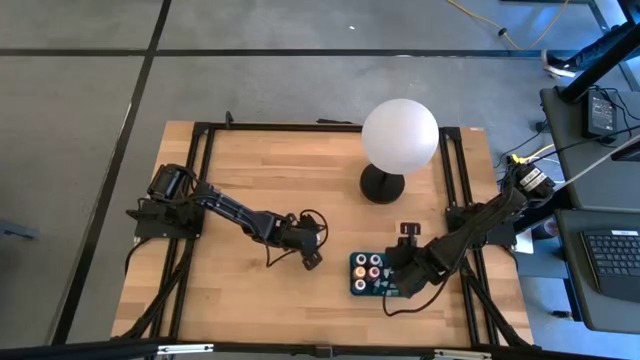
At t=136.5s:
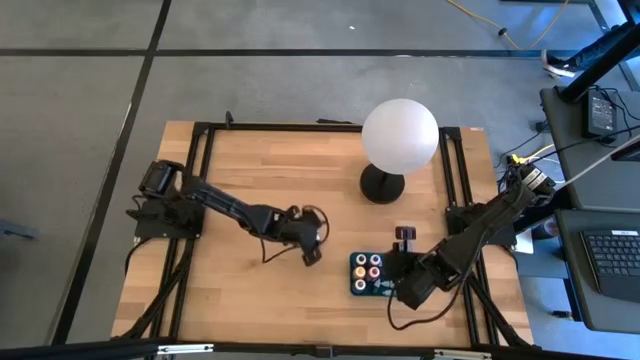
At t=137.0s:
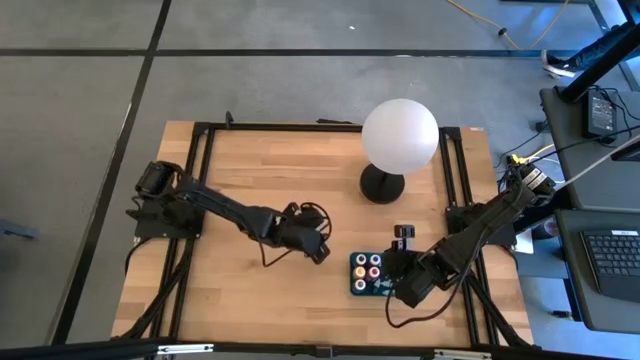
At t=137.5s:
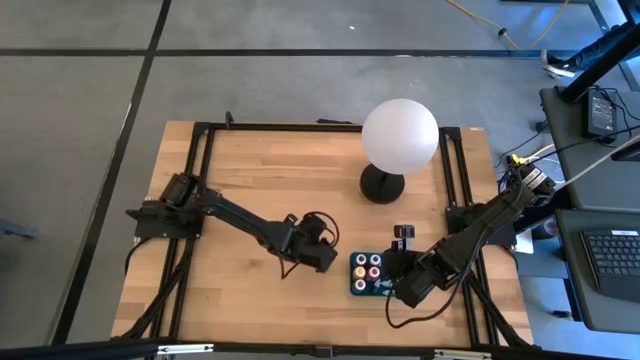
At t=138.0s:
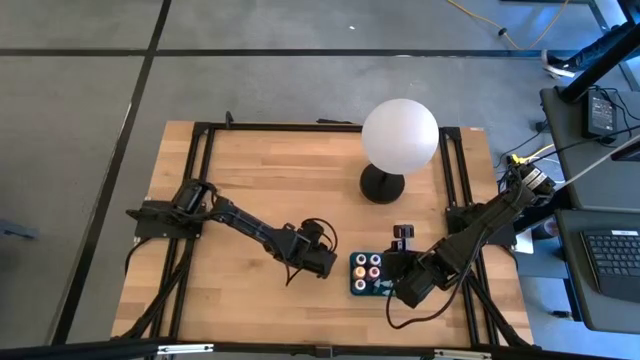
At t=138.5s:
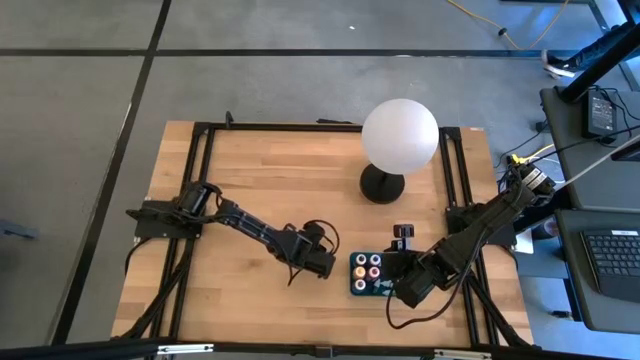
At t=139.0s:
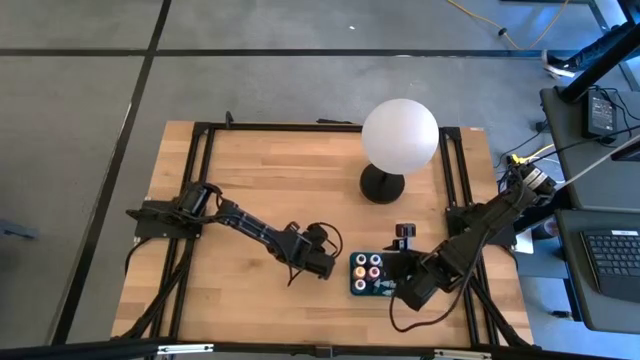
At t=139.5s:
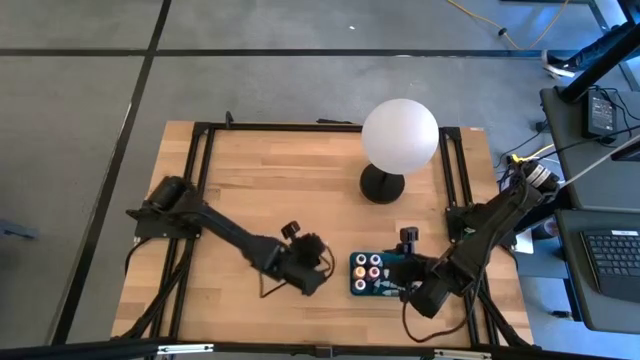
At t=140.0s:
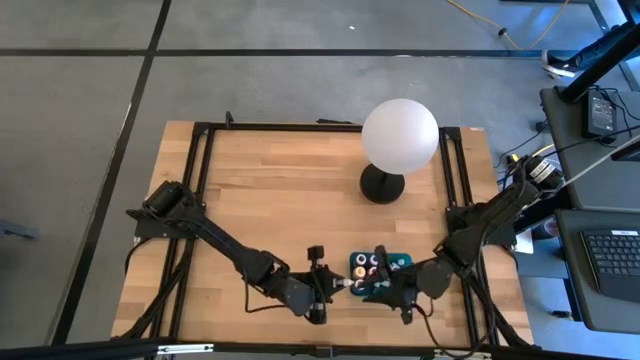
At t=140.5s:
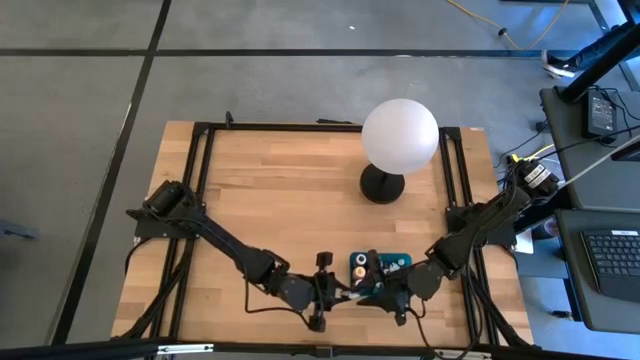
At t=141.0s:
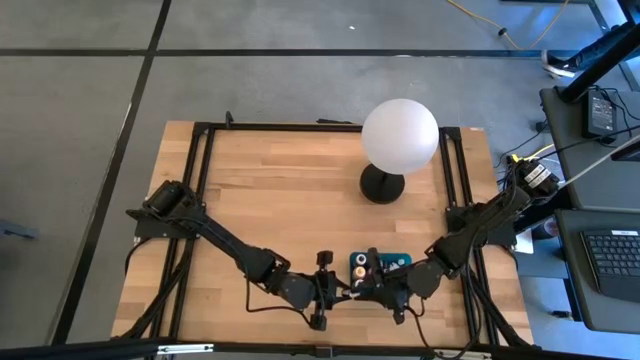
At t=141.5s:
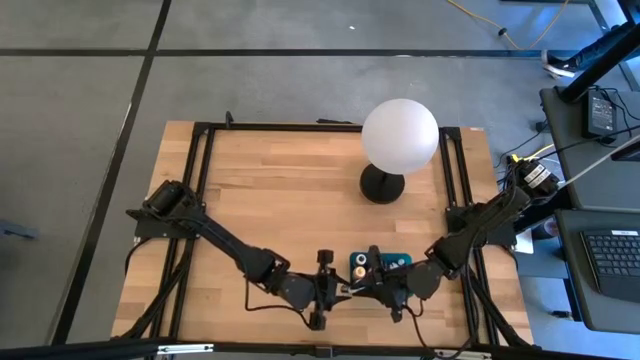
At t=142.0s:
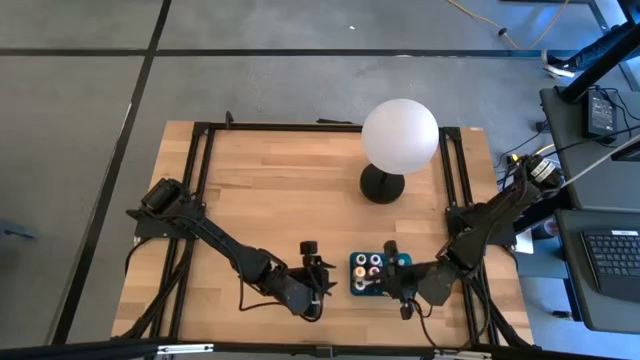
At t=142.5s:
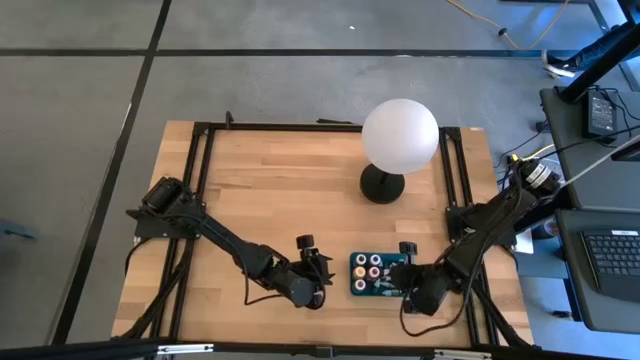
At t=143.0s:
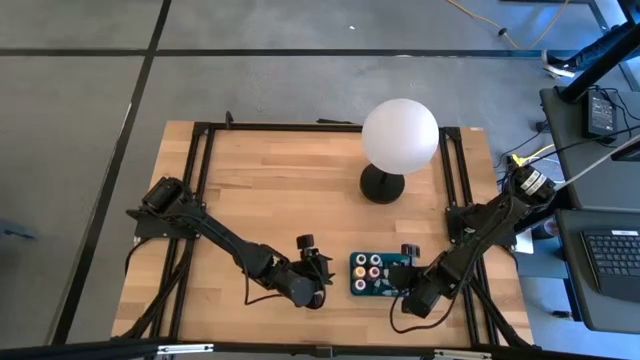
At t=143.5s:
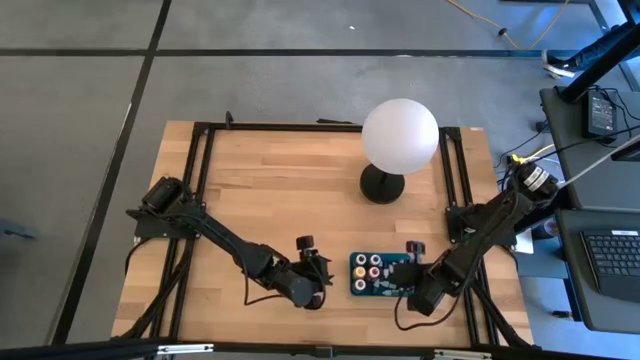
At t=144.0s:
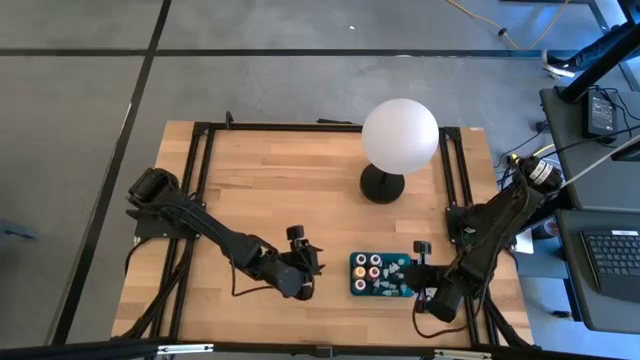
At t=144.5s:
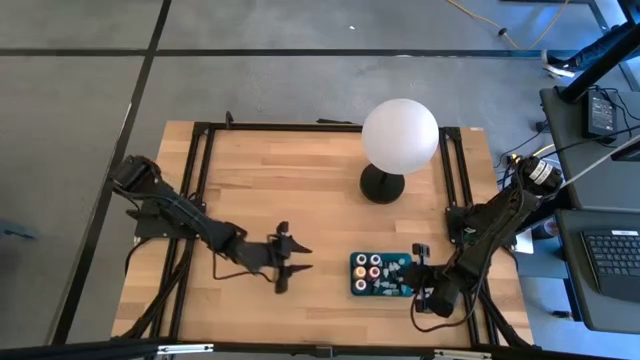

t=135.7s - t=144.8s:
Task: Pick & Place food coloring
Put the dark blue food coloring bottle into the blue bin

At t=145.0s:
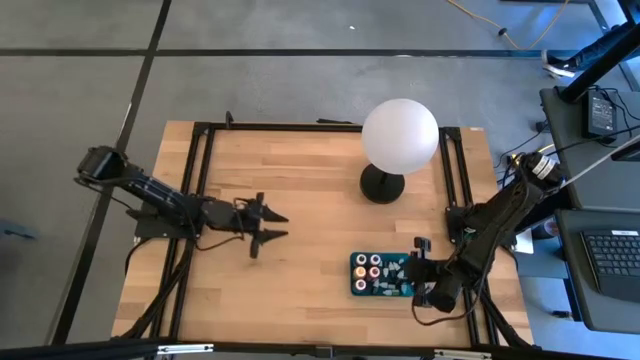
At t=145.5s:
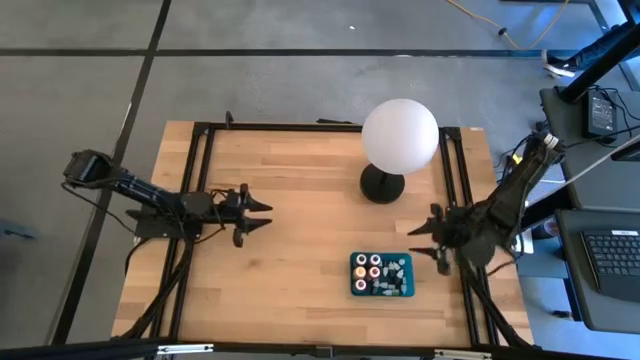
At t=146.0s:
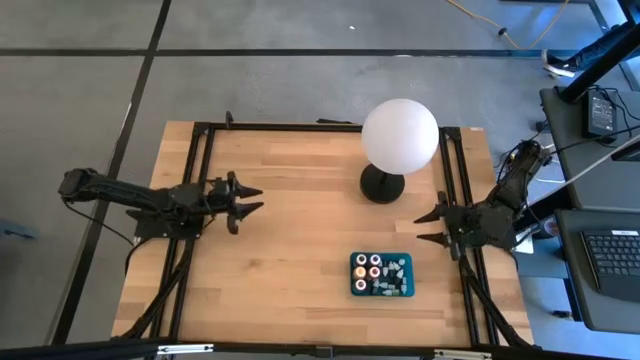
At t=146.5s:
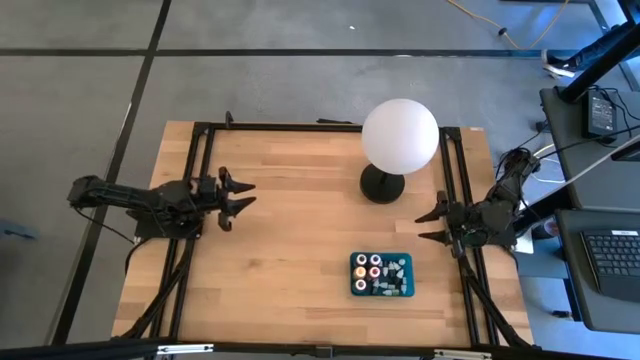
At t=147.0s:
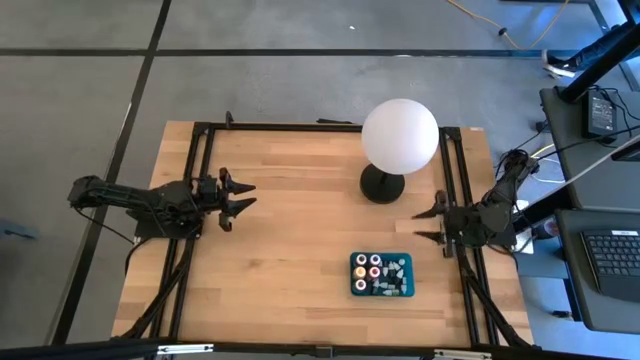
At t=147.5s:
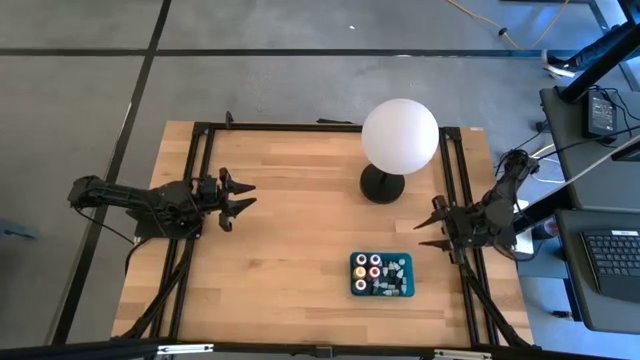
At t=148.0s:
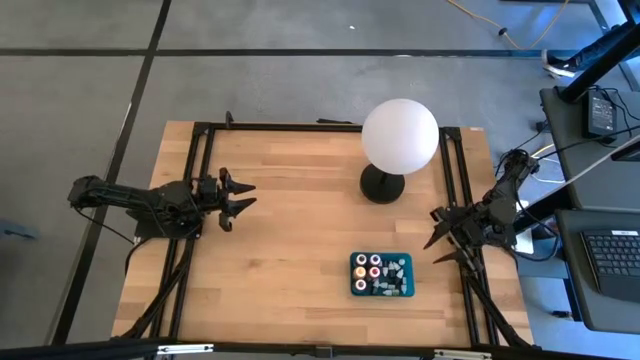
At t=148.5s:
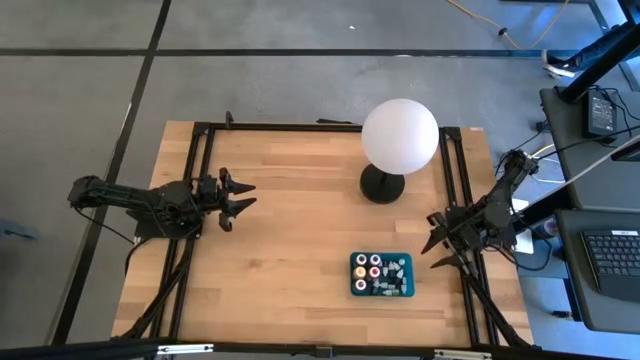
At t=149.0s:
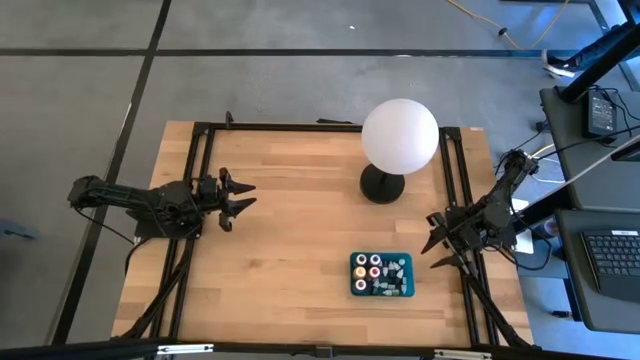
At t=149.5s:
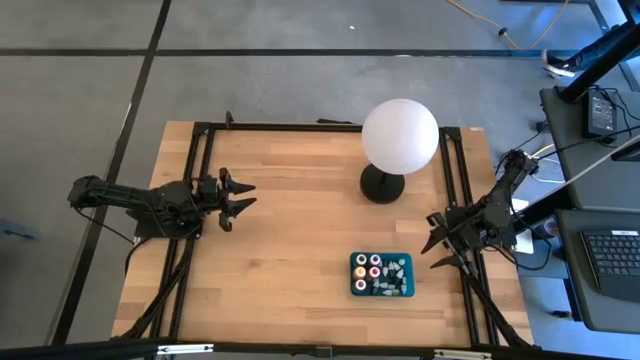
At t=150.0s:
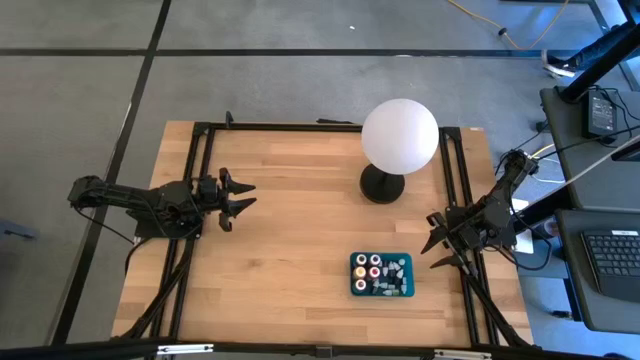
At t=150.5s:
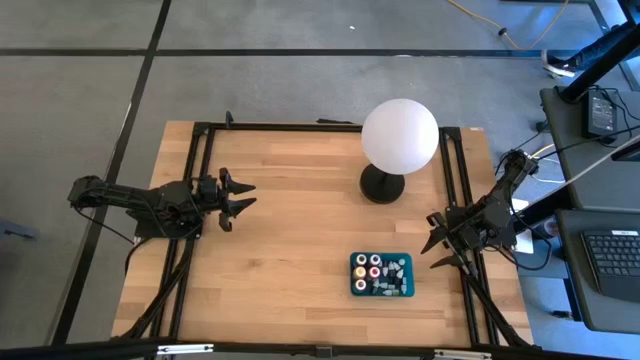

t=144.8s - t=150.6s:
Return to Home Position
